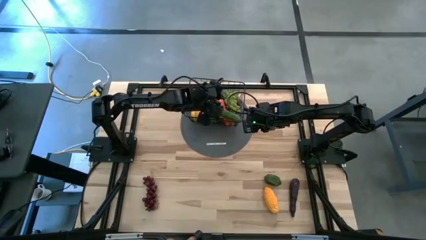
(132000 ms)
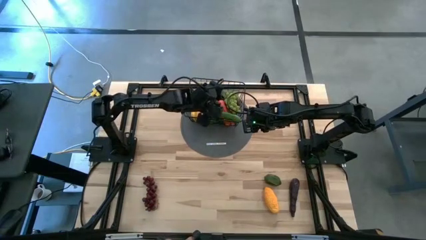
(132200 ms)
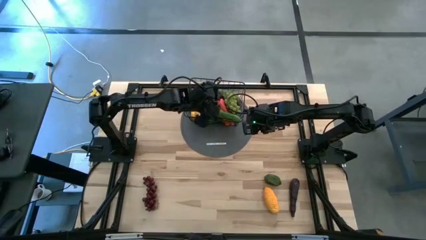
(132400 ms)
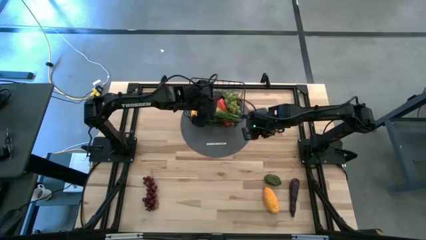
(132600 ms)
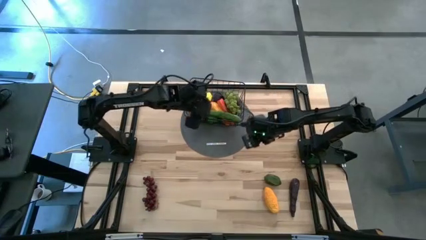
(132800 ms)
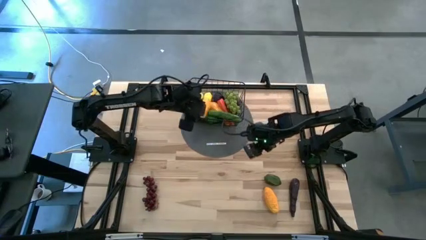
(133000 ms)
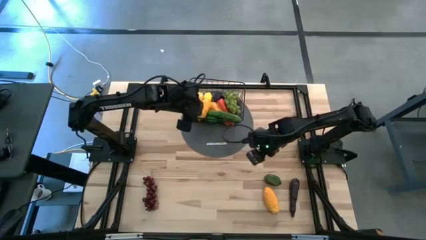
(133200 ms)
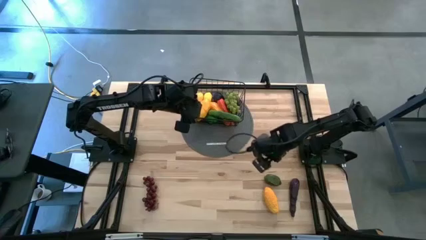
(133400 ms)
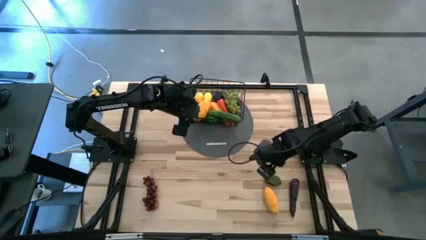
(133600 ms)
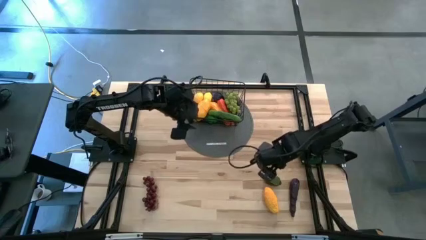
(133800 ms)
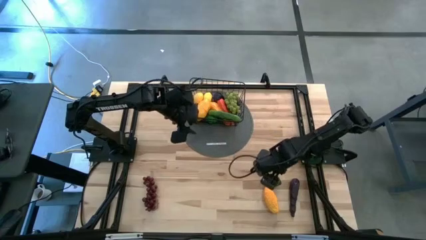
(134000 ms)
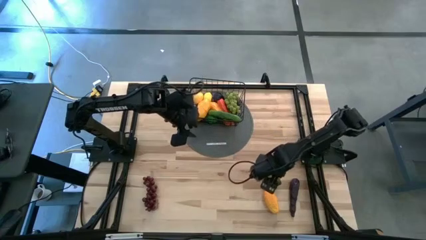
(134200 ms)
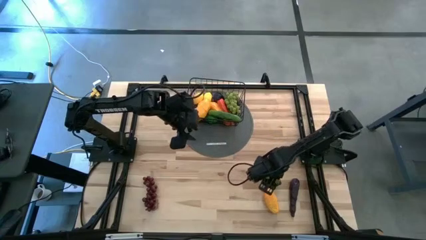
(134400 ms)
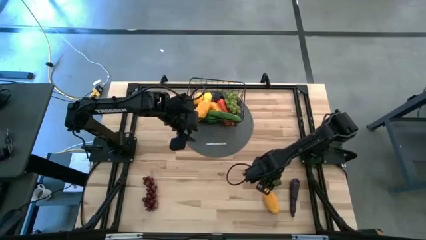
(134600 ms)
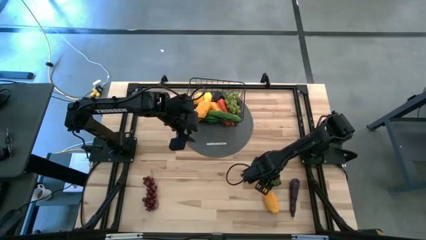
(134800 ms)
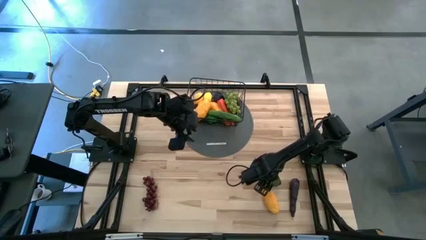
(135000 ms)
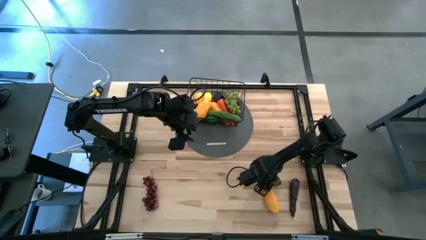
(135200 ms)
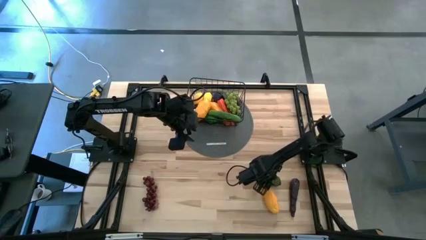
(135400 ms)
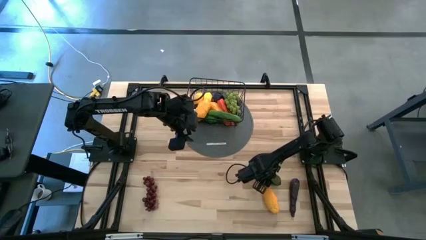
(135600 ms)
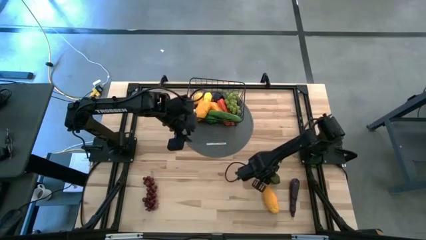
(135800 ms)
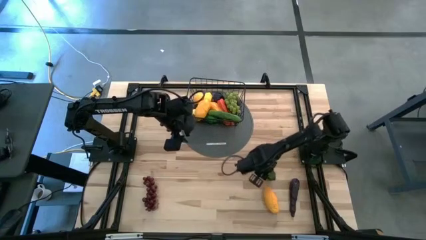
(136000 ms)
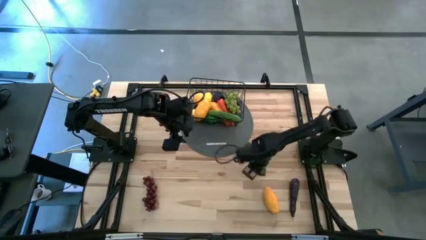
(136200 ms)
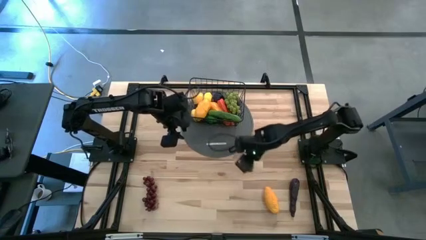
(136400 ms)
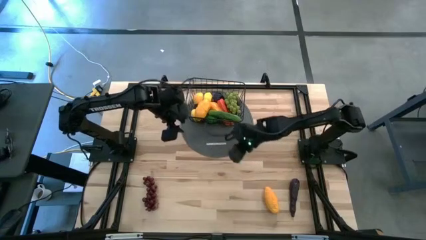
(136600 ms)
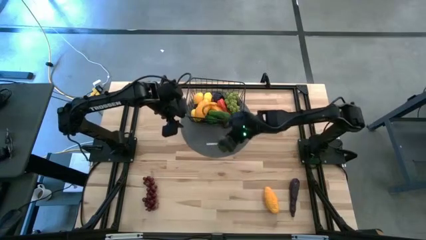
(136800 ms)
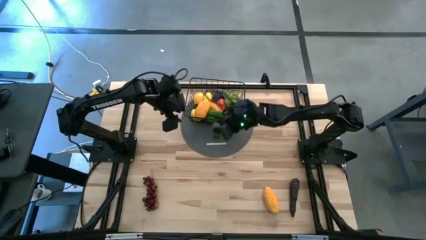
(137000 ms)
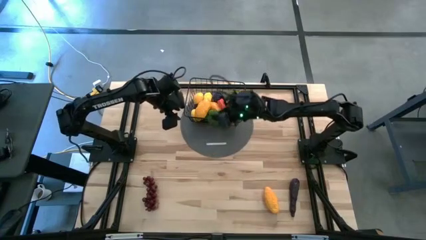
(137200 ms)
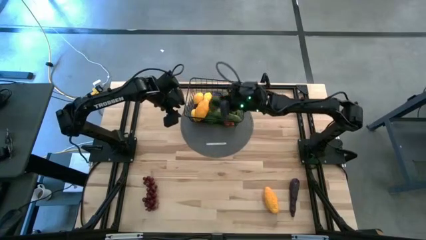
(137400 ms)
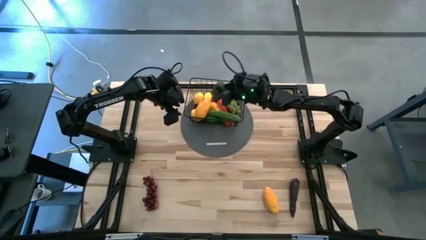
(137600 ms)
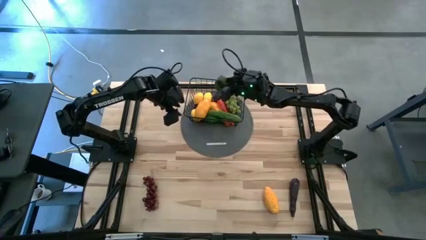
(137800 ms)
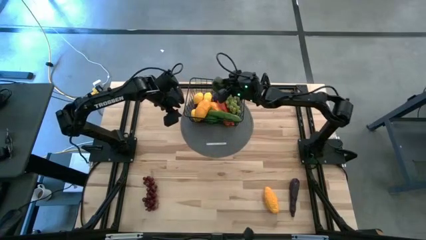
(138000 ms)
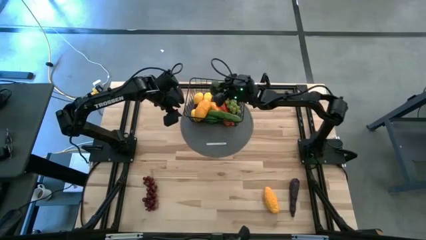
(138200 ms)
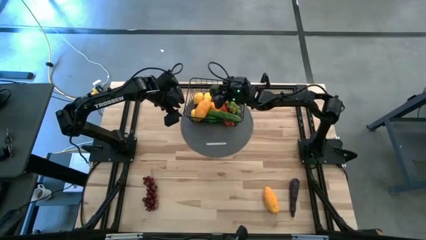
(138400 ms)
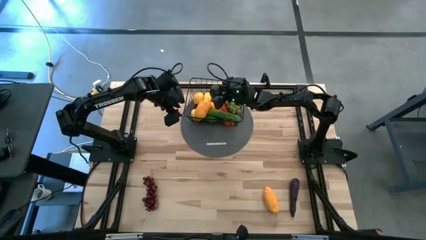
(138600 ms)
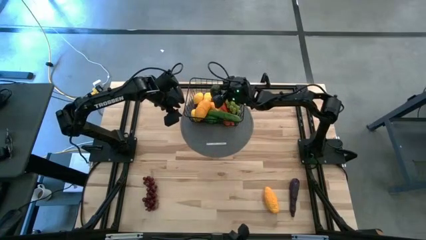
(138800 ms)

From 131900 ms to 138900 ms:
Task: Build produce basket
Put the green lime into the basket

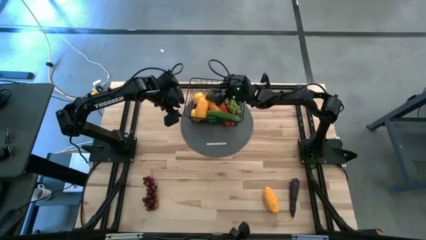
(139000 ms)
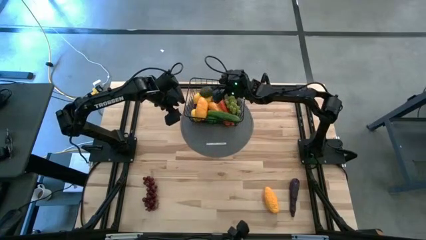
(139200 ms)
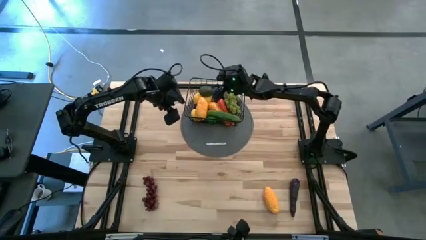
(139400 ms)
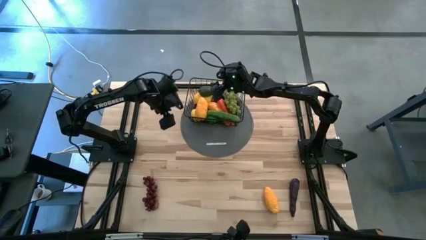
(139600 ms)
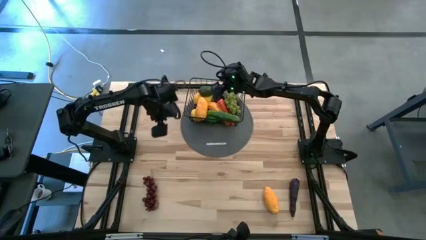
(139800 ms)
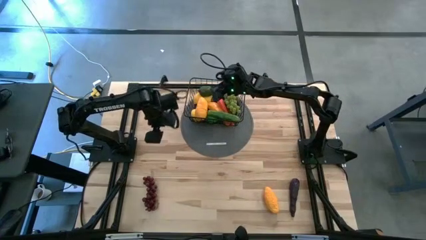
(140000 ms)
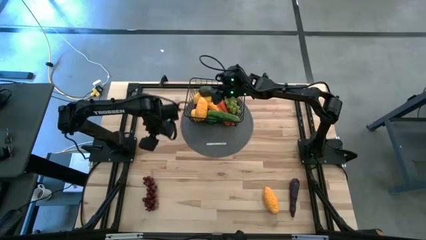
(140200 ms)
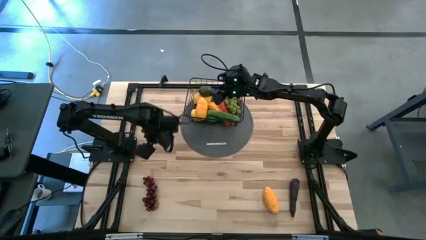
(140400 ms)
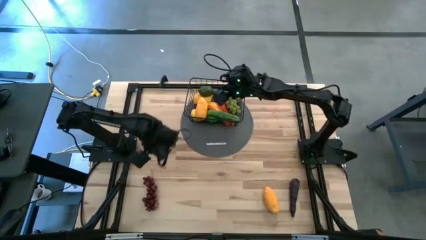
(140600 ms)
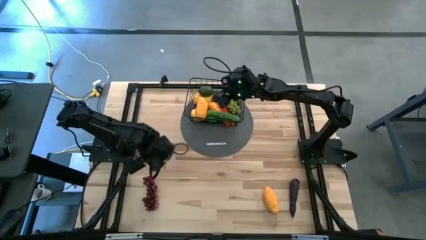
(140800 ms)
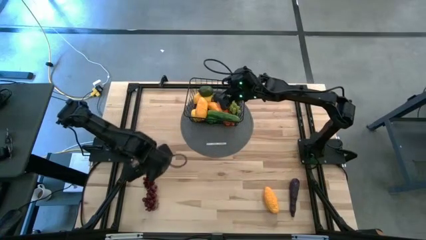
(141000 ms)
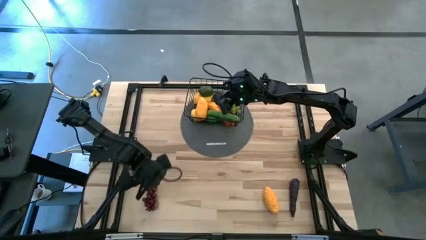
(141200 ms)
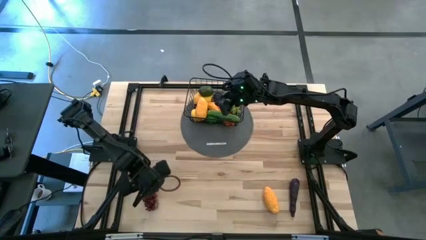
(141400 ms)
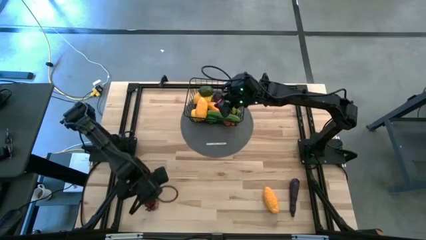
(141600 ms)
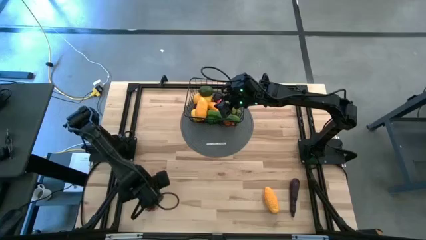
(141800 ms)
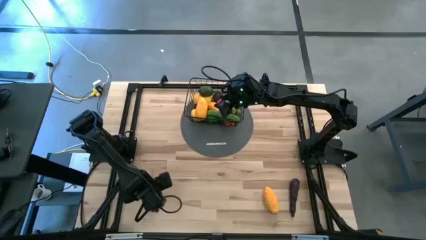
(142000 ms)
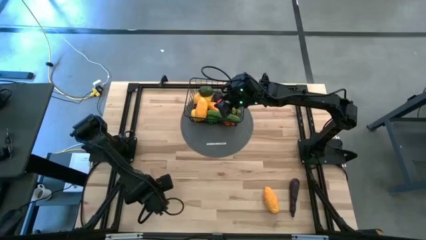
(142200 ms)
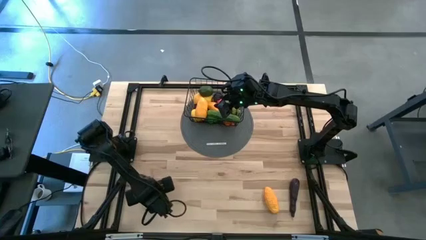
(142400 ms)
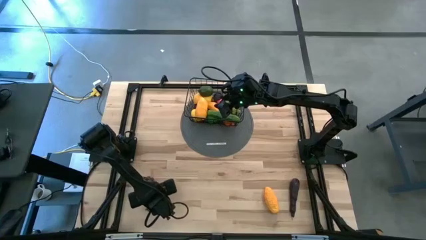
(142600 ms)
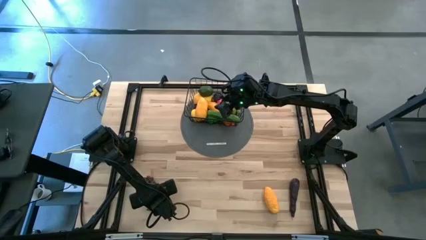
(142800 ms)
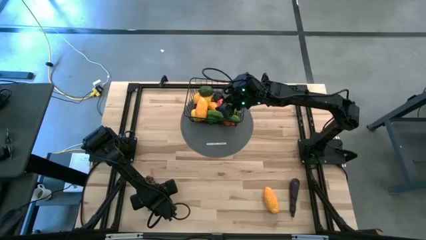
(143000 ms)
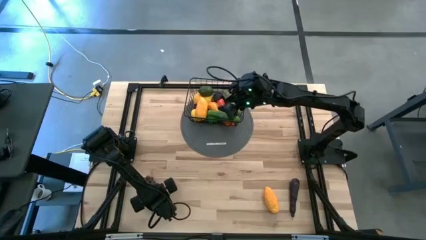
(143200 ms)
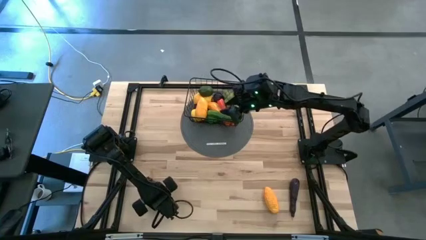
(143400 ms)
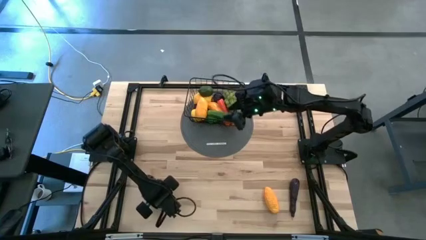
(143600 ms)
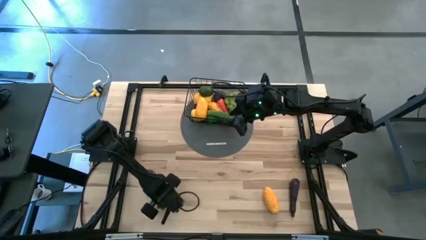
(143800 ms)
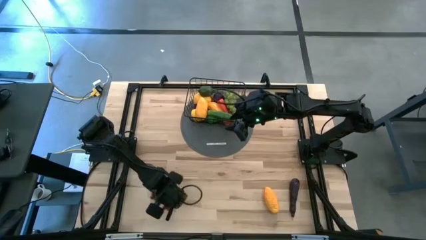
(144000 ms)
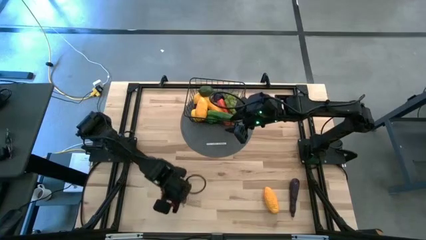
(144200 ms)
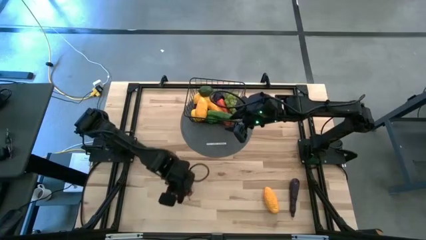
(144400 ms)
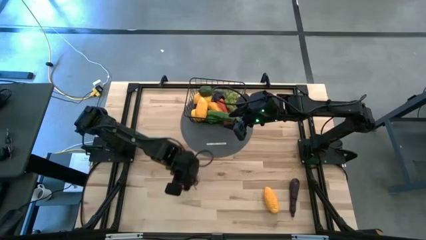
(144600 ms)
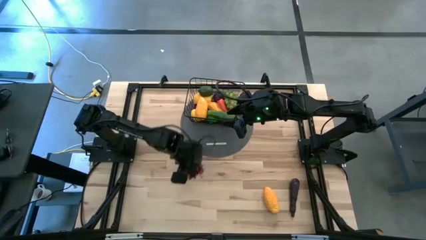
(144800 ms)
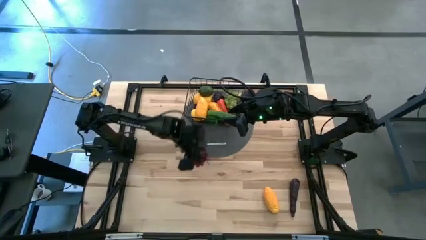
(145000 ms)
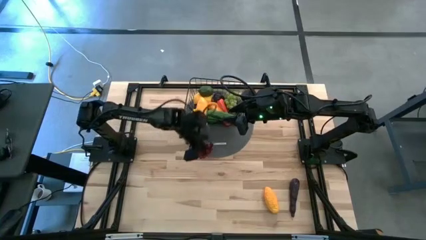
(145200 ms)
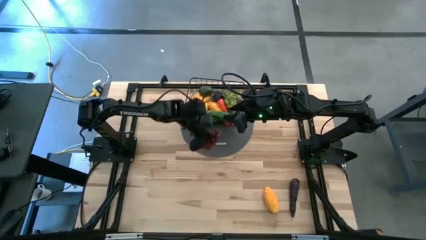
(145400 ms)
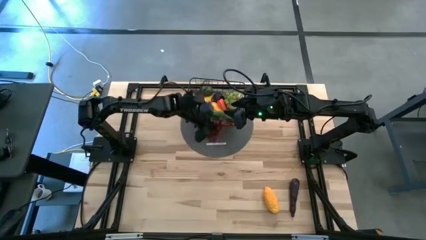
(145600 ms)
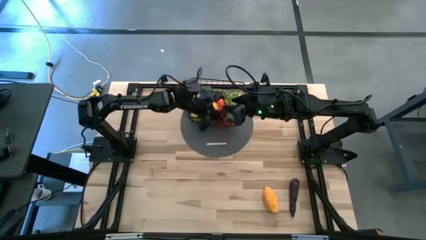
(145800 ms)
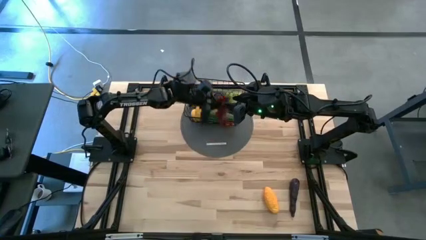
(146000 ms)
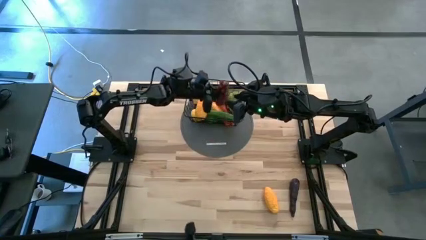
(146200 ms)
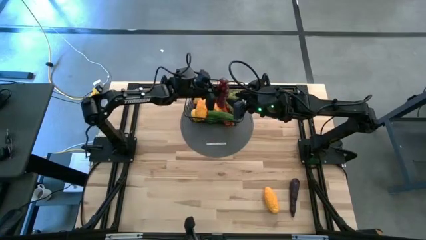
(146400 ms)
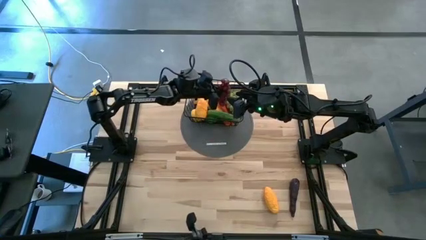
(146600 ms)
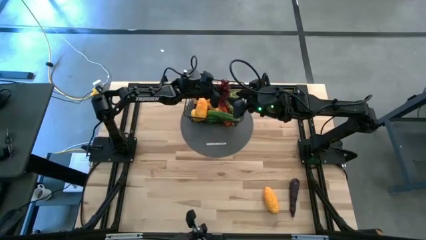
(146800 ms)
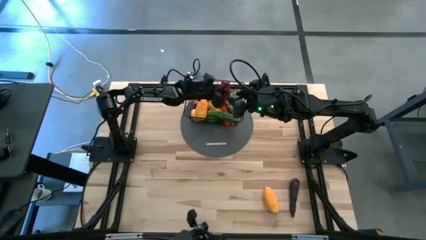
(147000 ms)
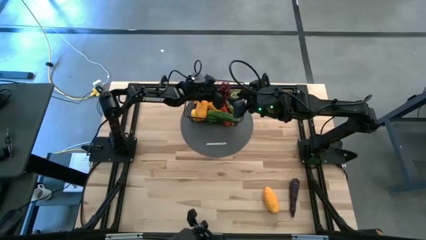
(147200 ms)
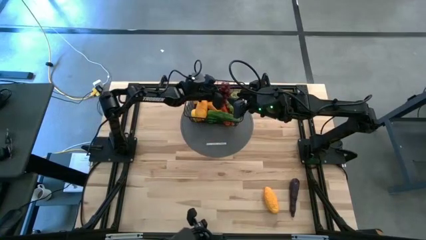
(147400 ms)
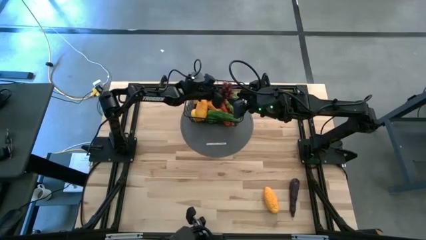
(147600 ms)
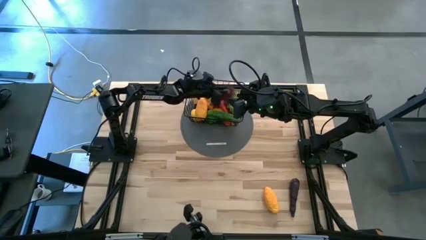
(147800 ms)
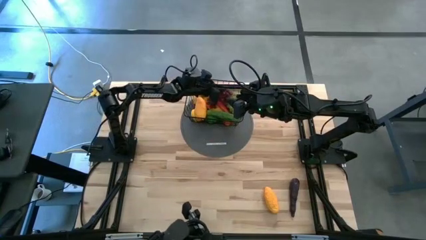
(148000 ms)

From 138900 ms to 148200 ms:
Put the purple grapes into the basket
